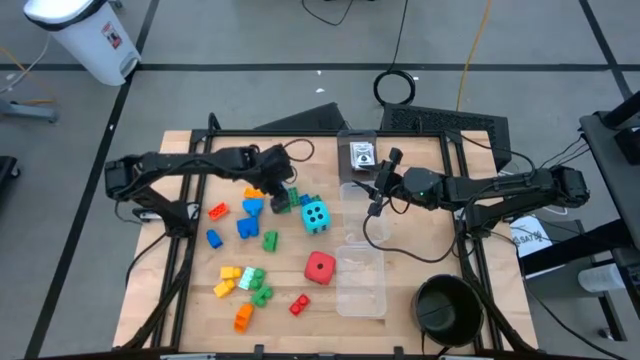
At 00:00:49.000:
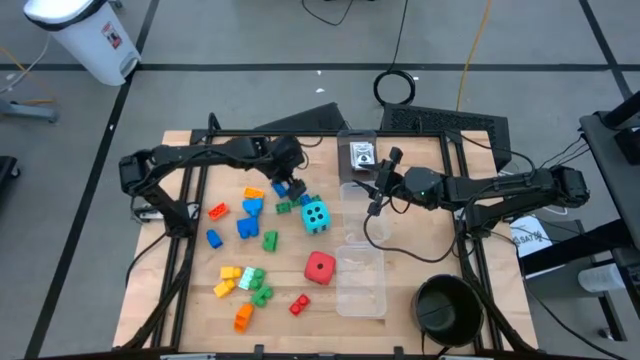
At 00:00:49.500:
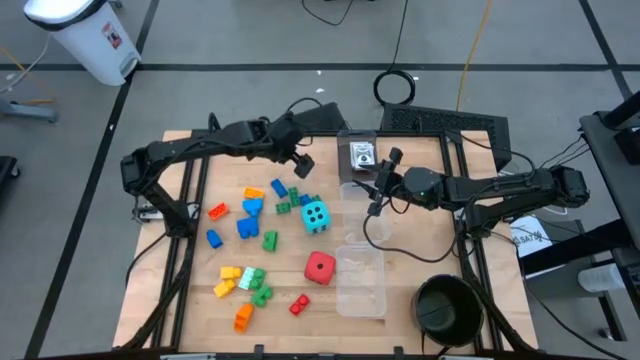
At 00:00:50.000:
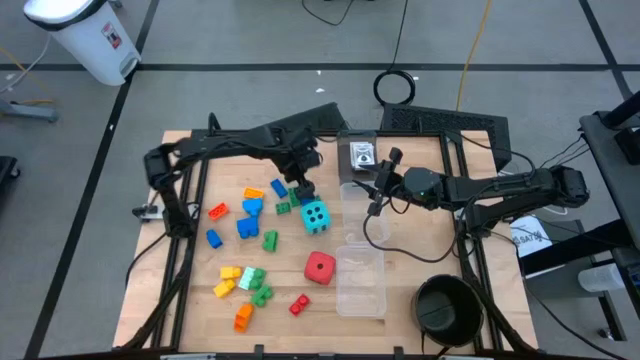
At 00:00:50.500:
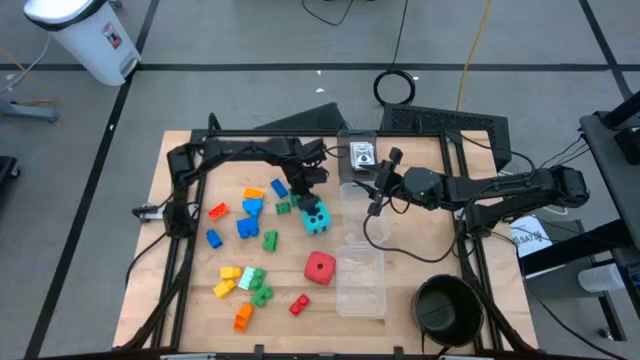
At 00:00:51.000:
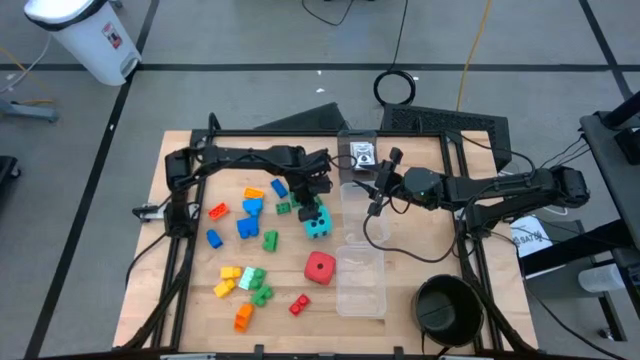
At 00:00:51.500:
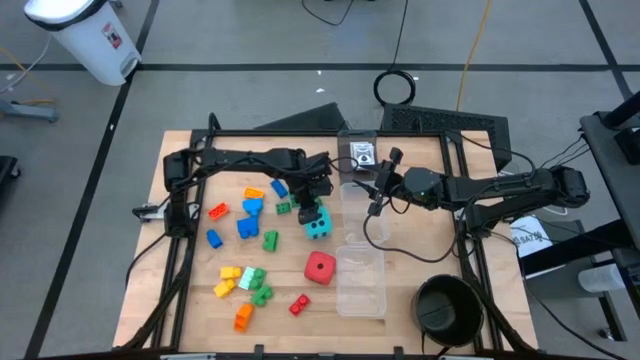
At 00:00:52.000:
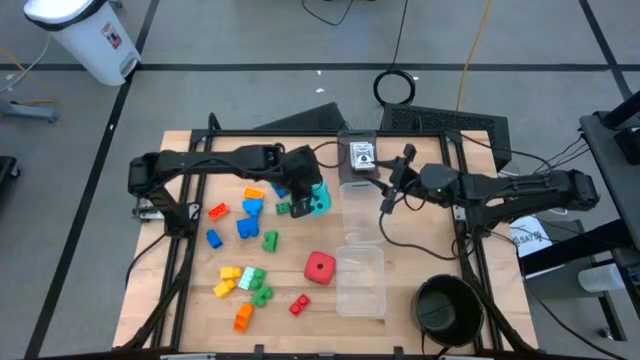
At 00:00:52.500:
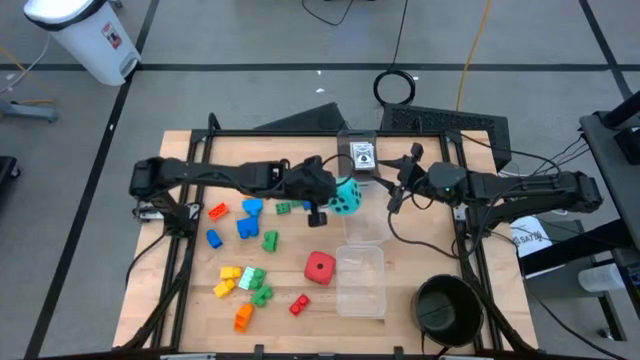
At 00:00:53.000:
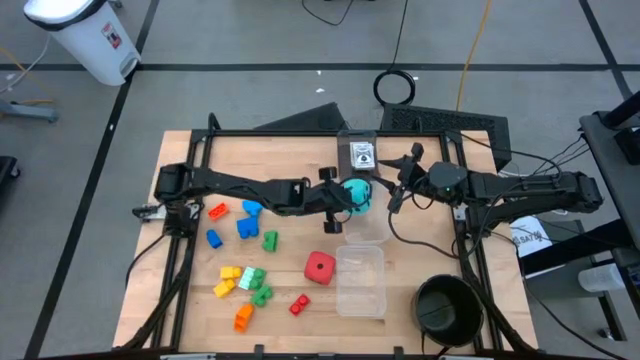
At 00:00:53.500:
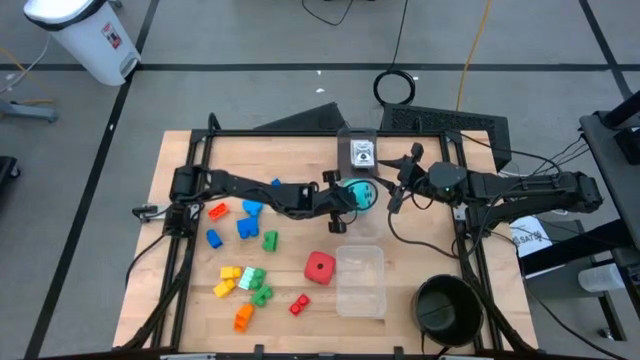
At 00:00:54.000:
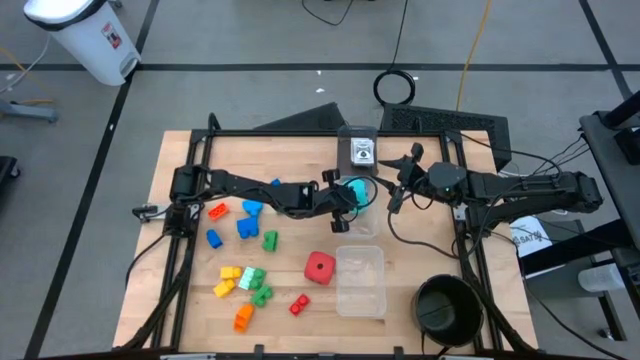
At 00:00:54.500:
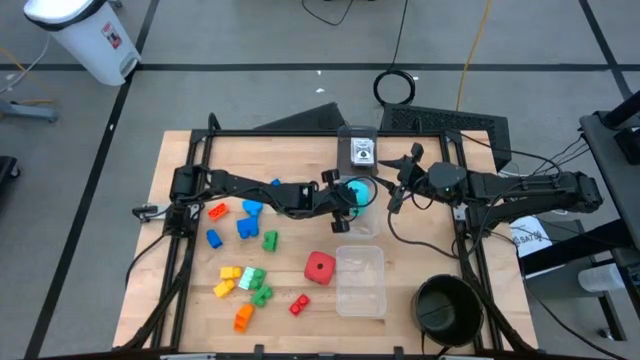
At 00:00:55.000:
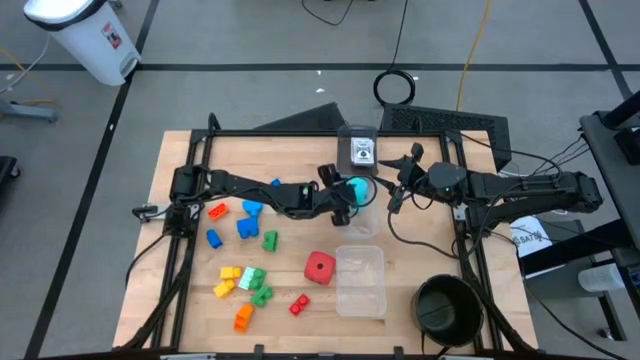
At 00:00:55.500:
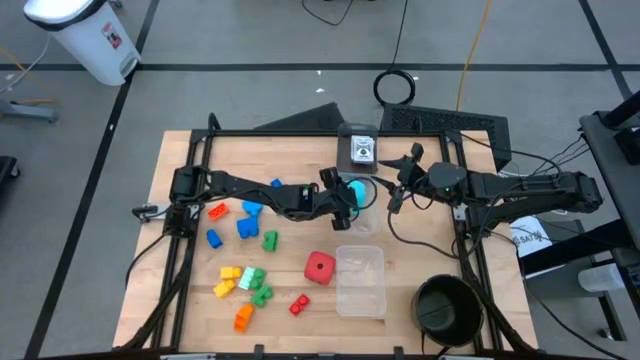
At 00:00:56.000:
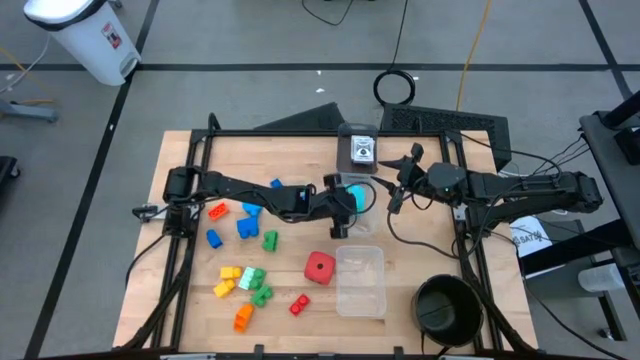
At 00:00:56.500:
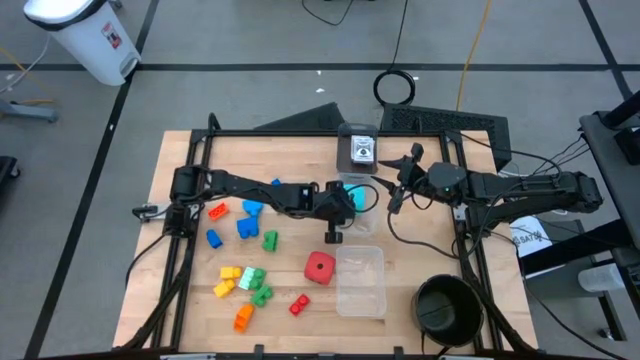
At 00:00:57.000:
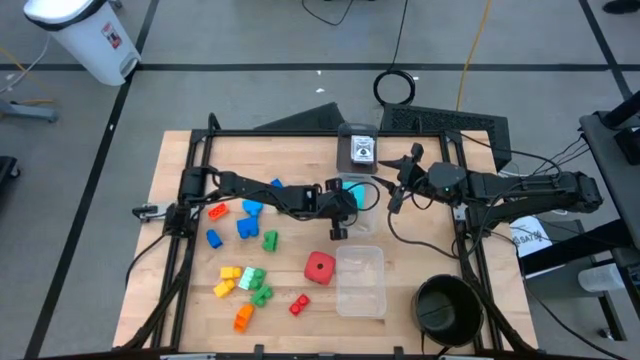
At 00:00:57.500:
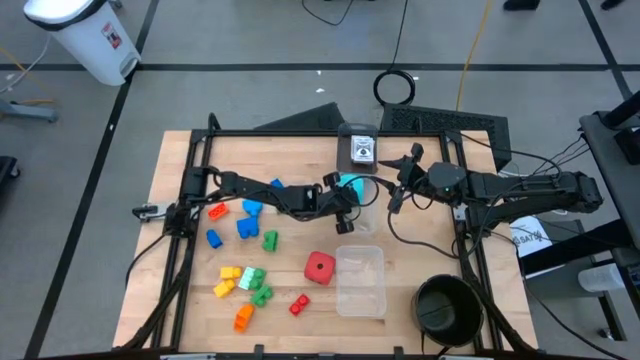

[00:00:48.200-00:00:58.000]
Task: Pick & Place Toys
Put the blue dice into the middle transparent bin

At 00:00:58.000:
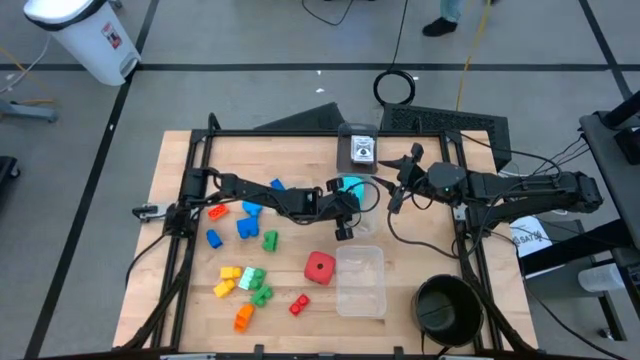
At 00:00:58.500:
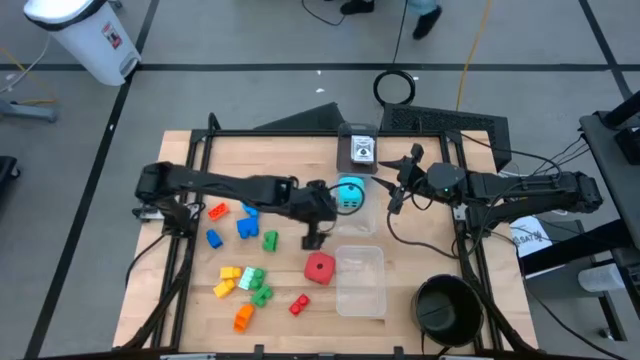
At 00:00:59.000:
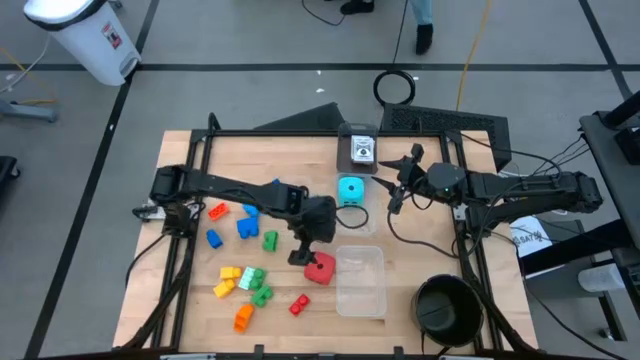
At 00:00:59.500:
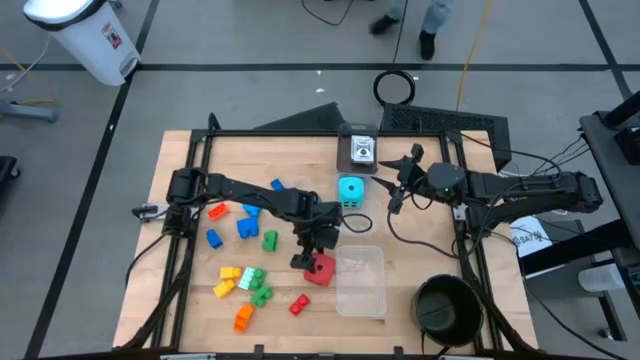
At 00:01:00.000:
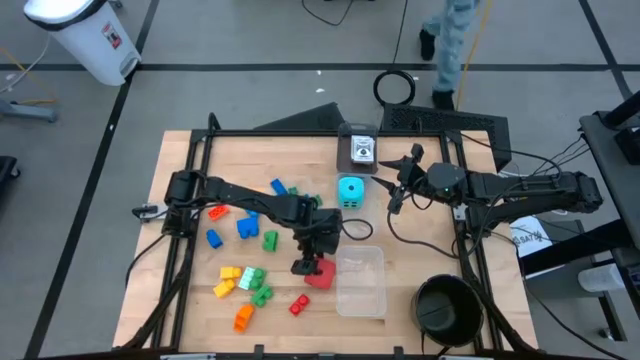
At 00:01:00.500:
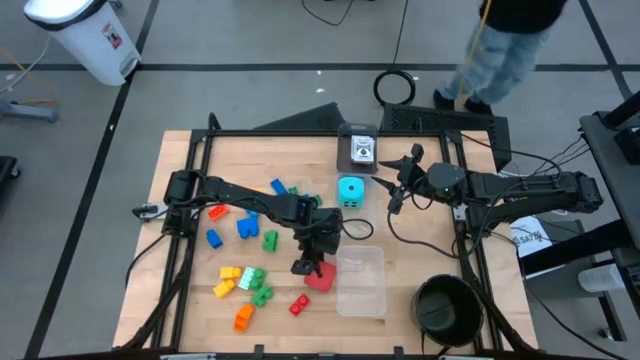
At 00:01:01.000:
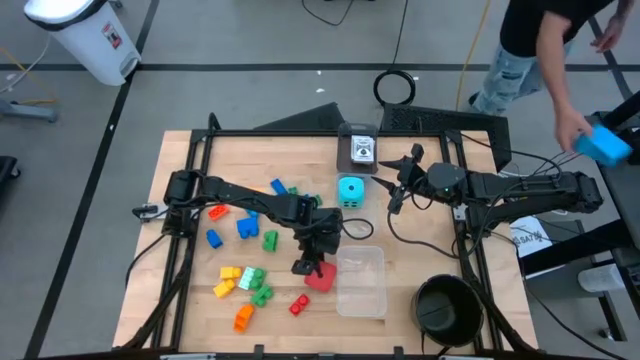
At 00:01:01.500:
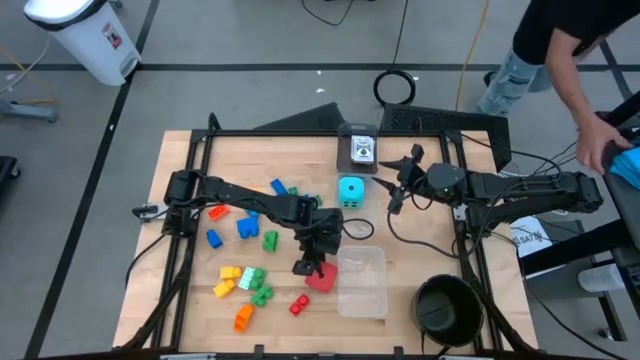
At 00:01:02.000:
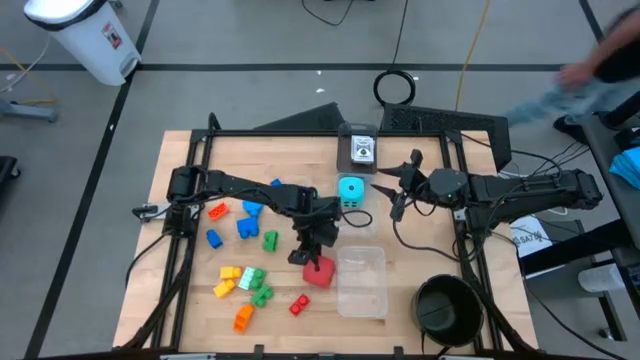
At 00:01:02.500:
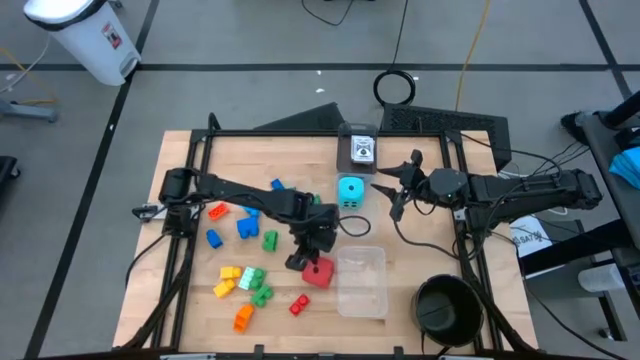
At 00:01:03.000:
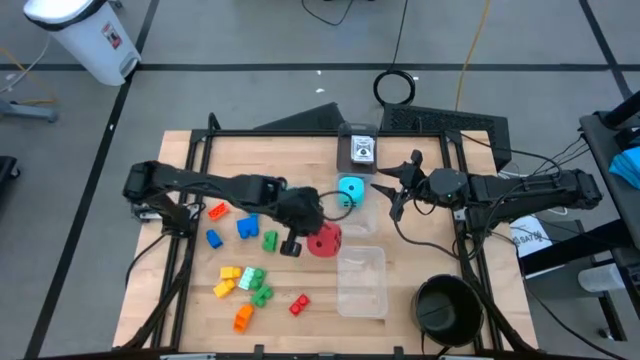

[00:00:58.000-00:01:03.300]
Put the red dice into the middle transparent bin

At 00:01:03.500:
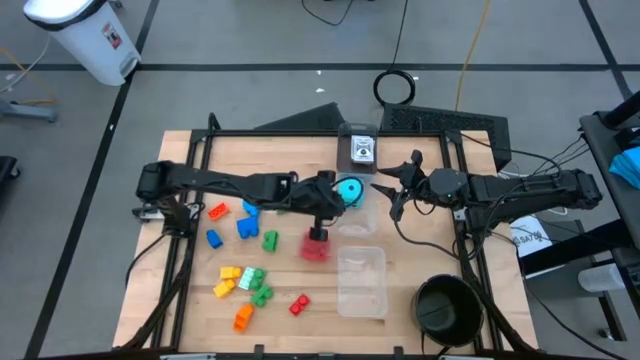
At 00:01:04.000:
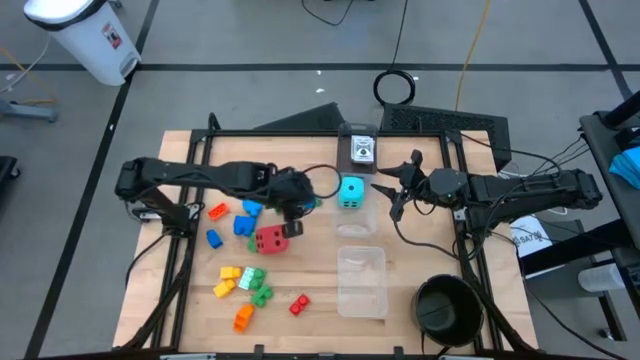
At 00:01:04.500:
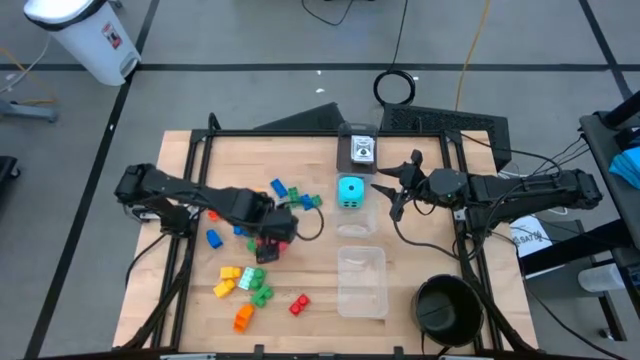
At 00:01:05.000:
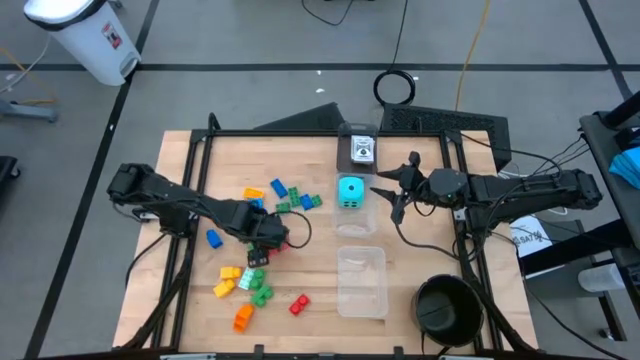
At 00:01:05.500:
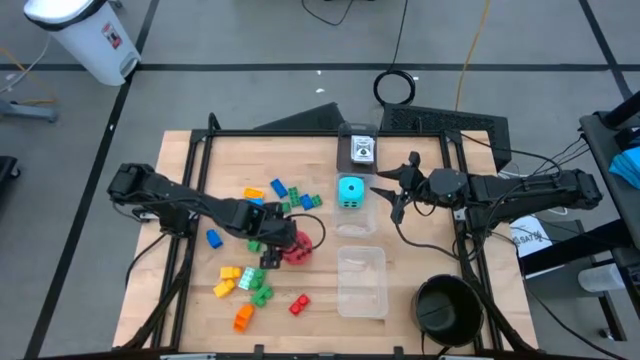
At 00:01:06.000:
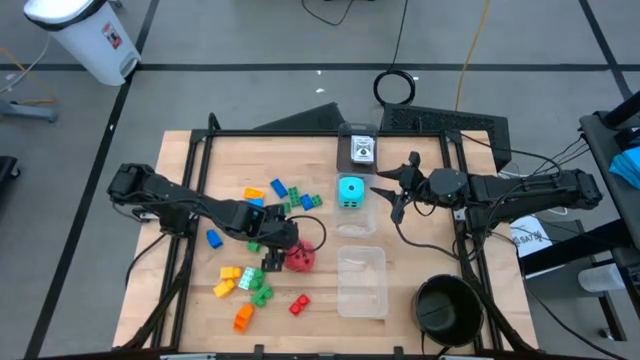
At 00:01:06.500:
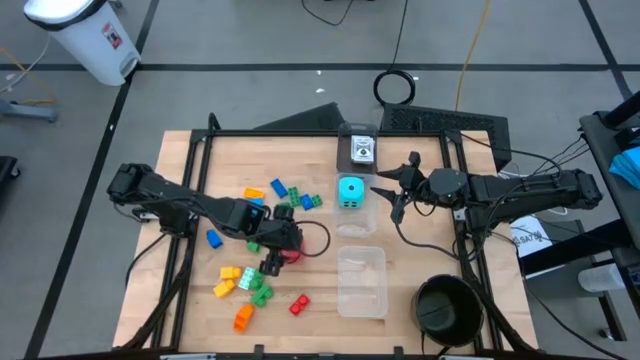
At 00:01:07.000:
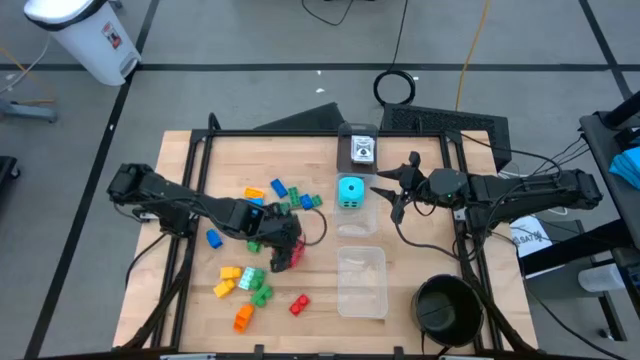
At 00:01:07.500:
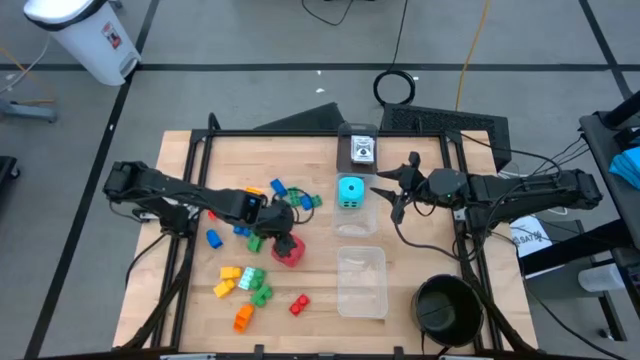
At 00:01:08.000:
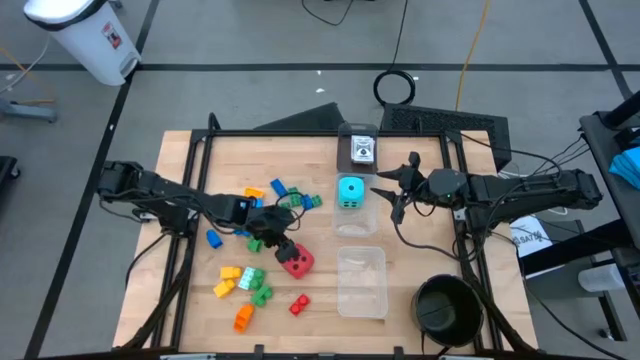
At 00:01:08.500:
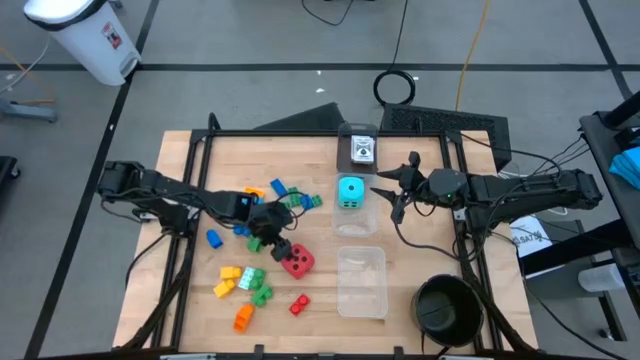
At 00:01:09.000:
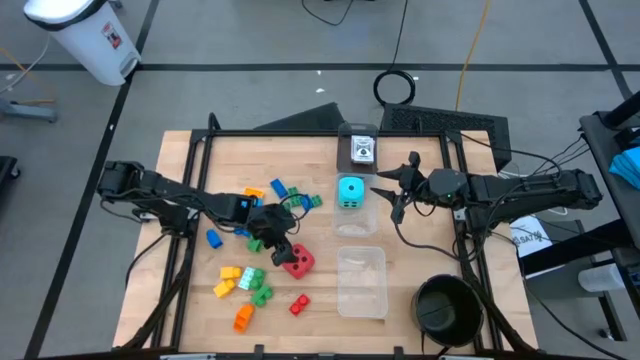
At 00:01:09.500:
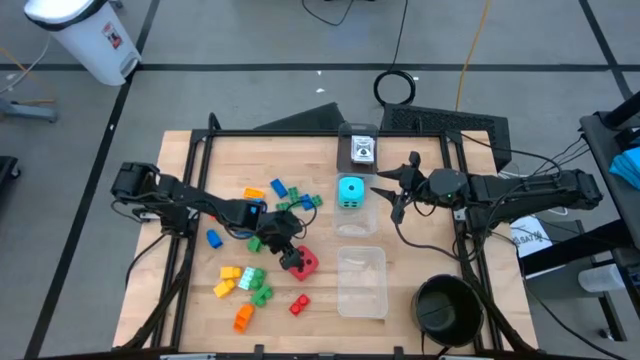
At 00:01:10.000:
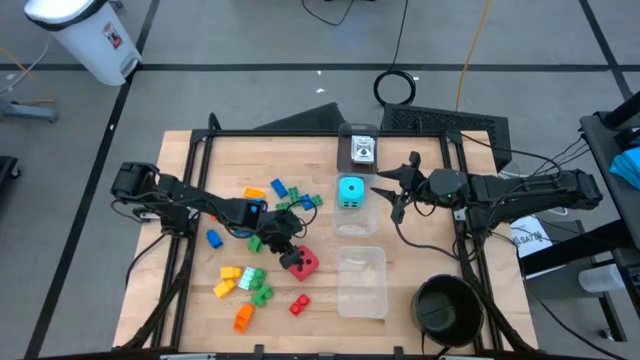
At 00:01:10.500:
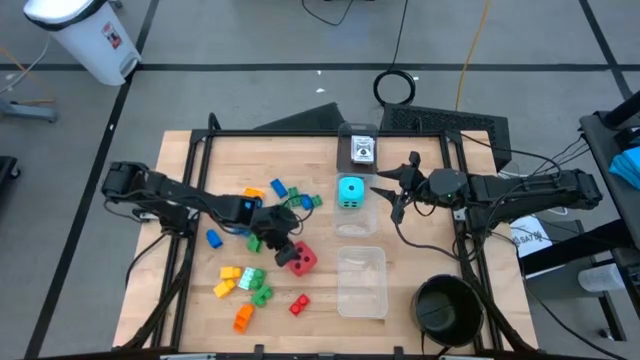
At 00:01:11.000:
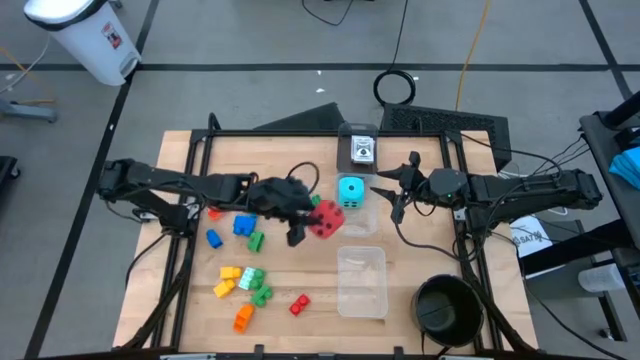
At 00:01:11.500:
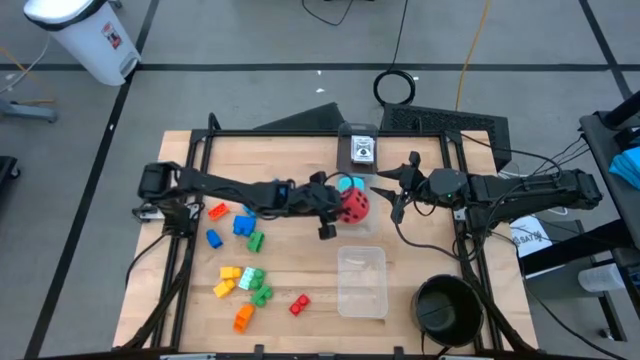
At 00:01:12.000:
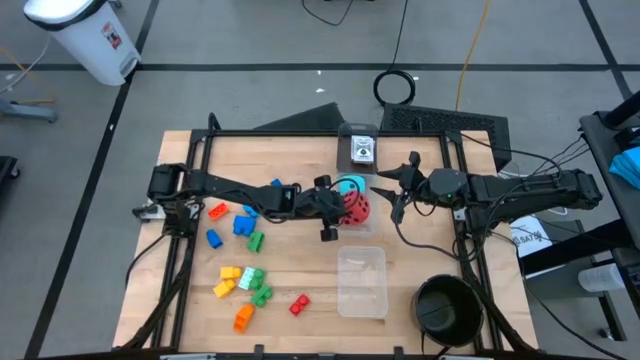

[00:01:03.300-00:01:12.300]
Put the red dice into the middle transparent bin
